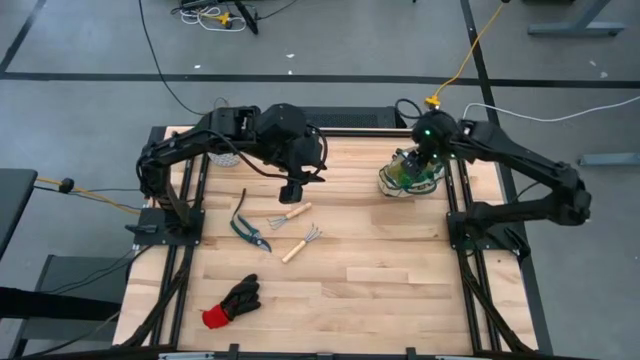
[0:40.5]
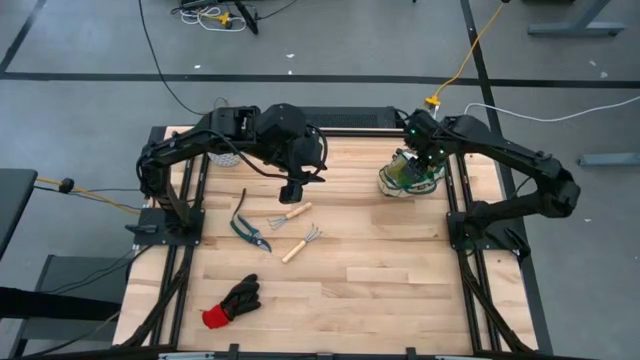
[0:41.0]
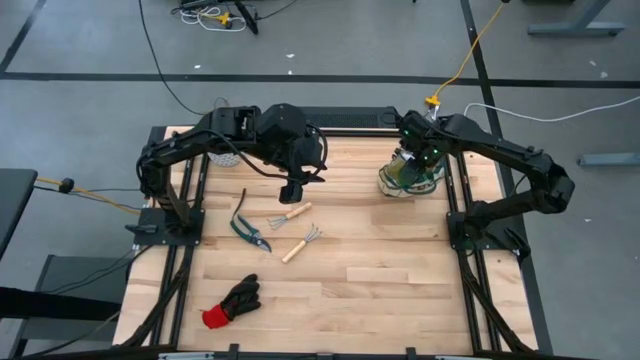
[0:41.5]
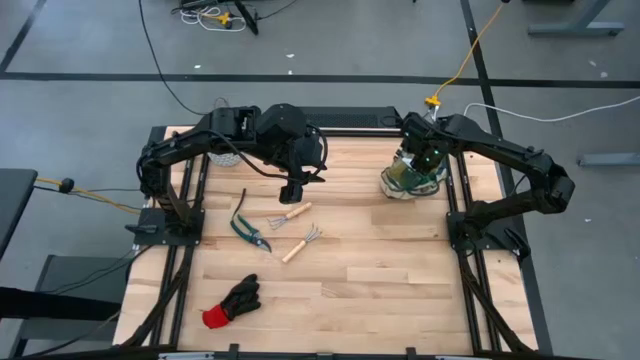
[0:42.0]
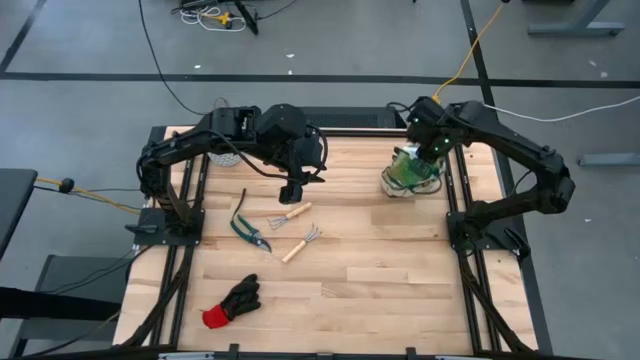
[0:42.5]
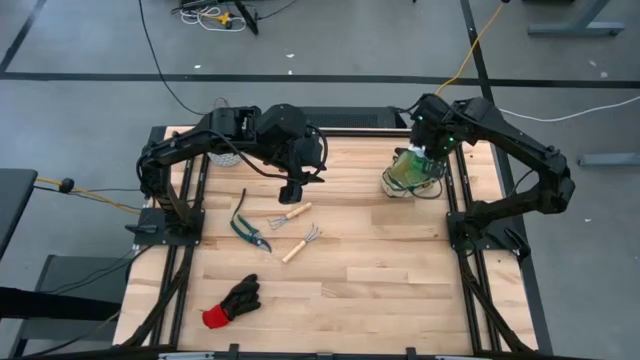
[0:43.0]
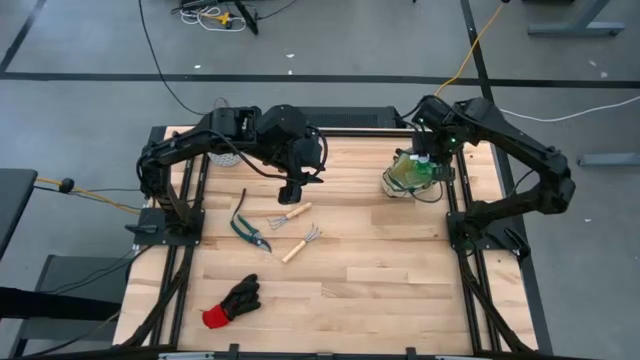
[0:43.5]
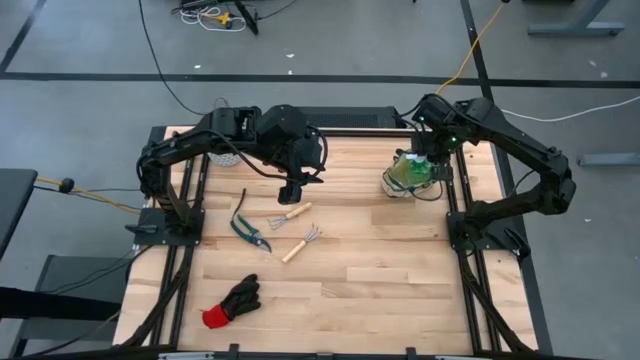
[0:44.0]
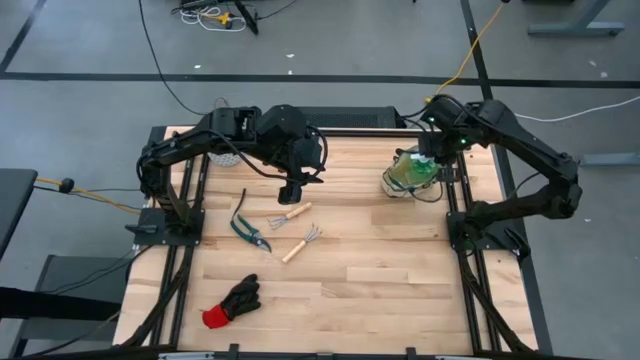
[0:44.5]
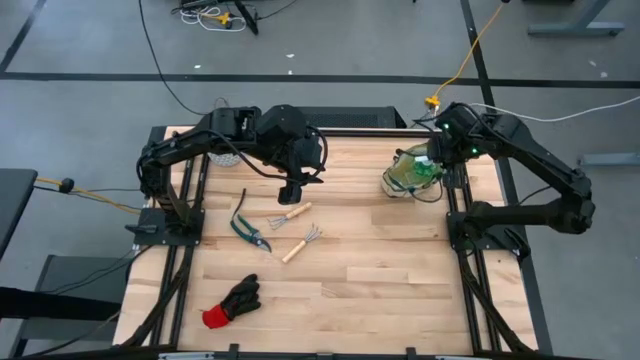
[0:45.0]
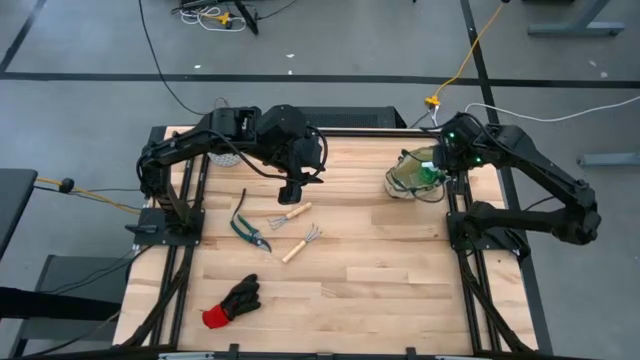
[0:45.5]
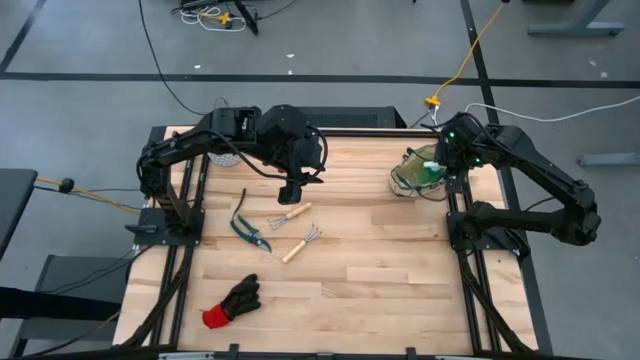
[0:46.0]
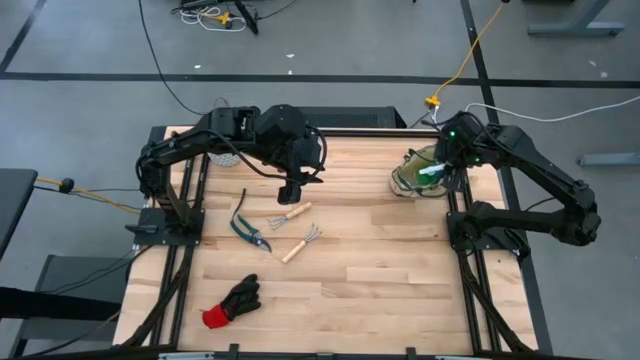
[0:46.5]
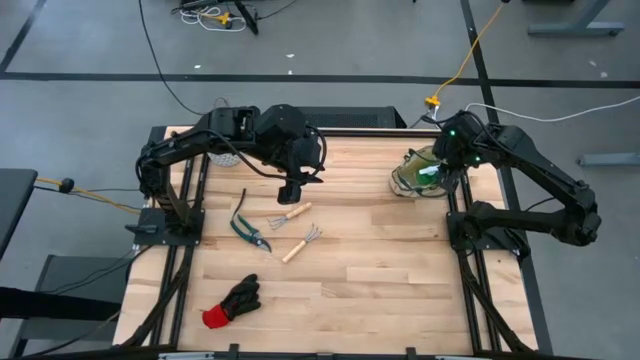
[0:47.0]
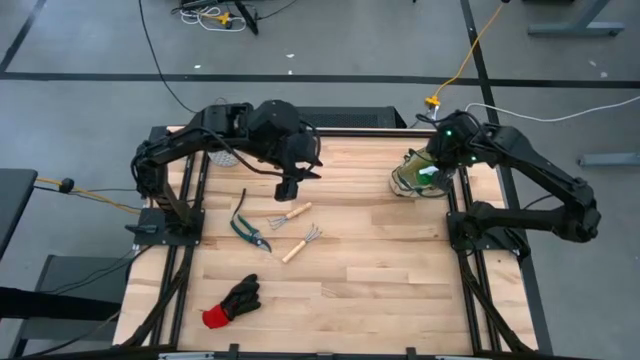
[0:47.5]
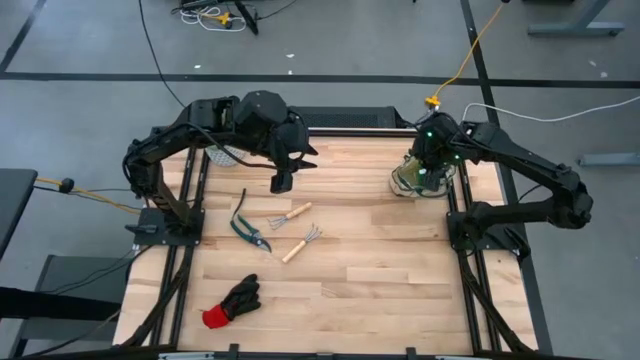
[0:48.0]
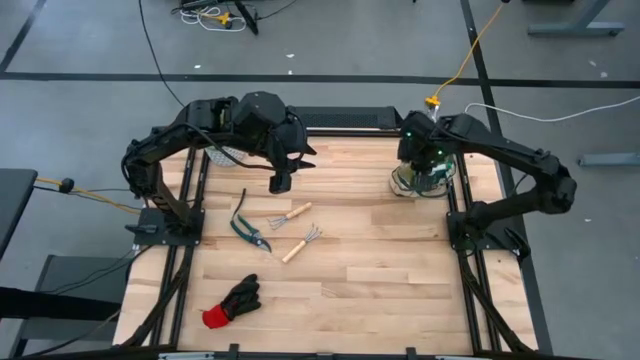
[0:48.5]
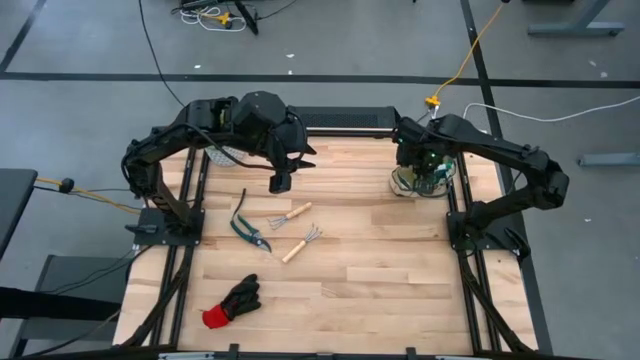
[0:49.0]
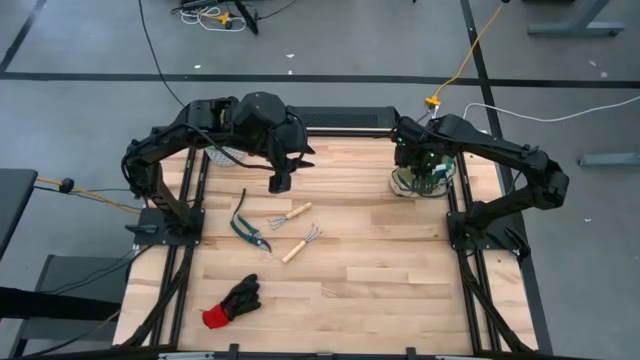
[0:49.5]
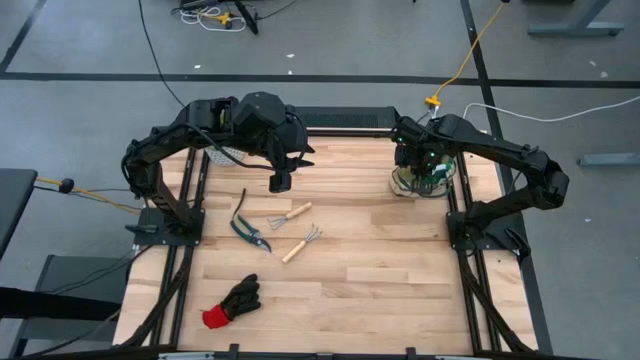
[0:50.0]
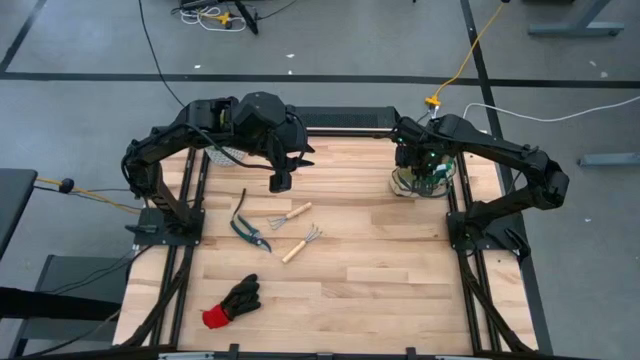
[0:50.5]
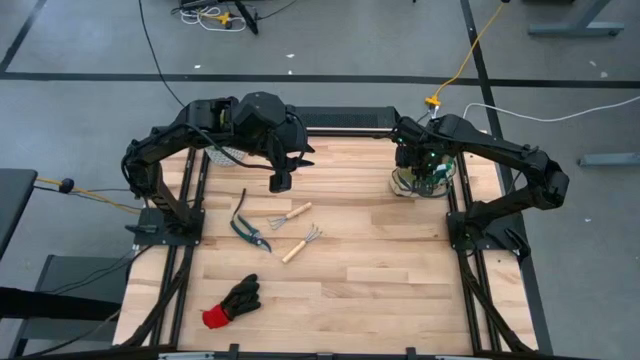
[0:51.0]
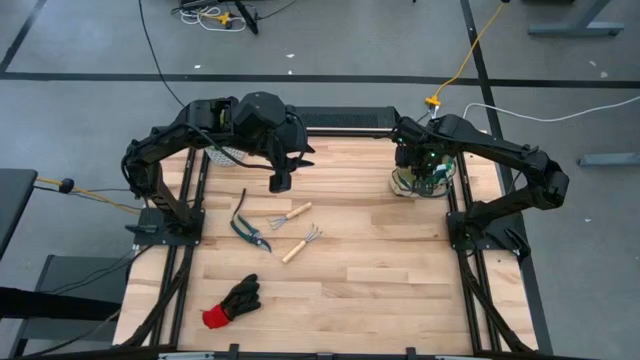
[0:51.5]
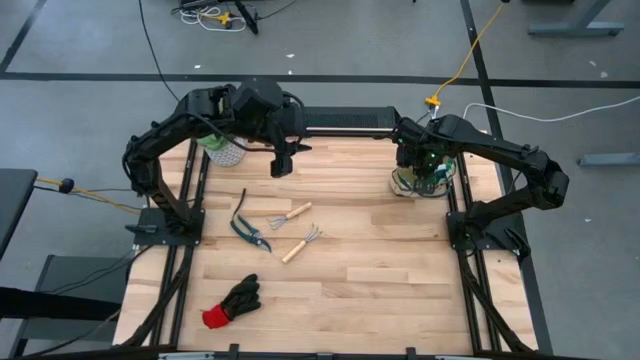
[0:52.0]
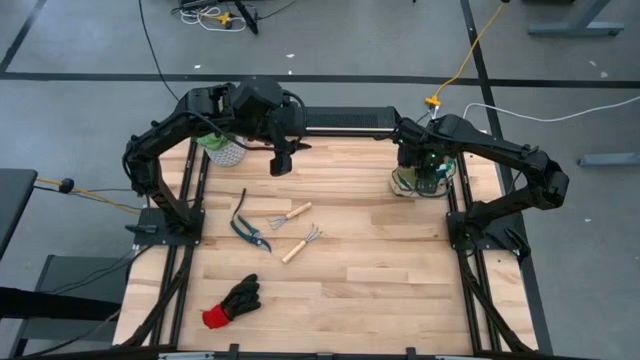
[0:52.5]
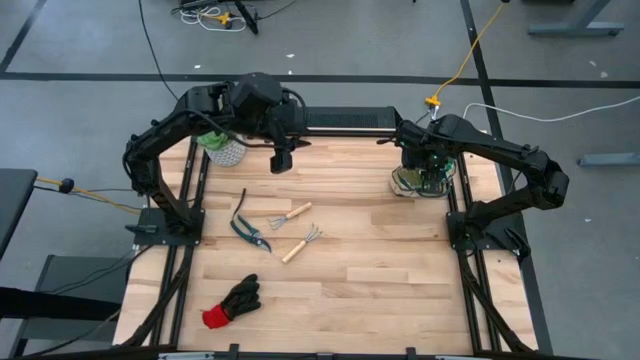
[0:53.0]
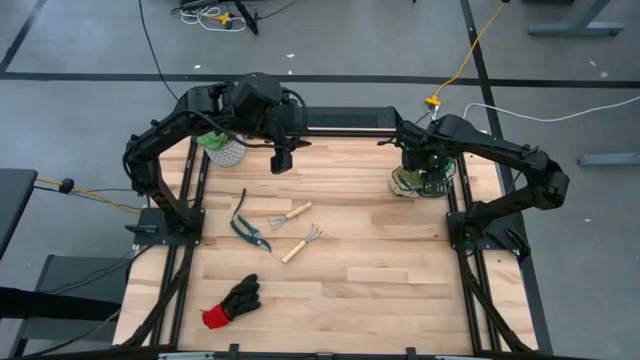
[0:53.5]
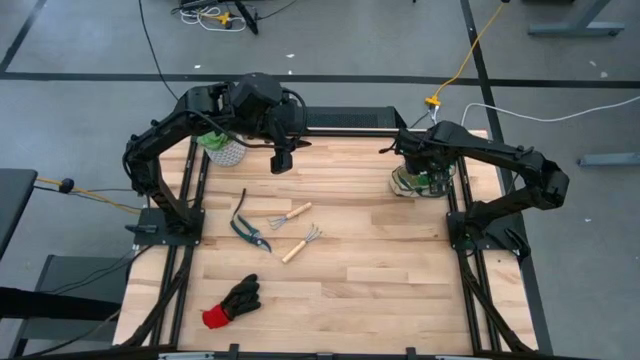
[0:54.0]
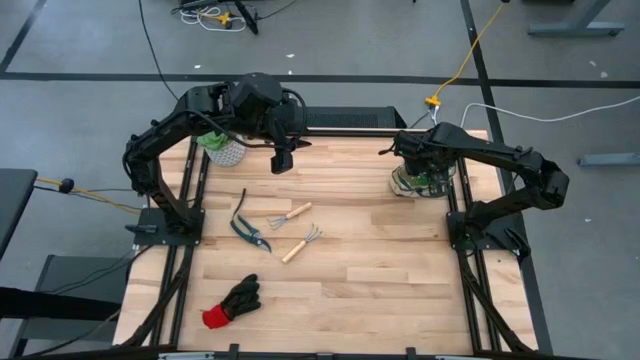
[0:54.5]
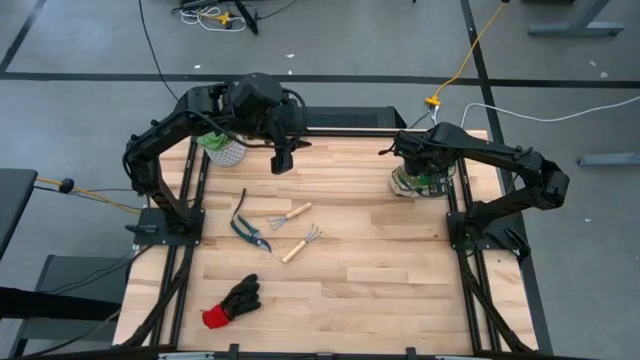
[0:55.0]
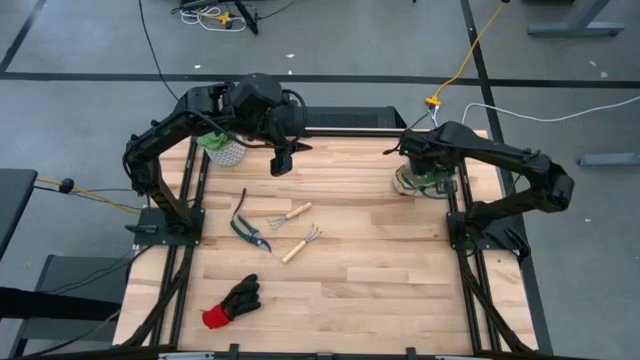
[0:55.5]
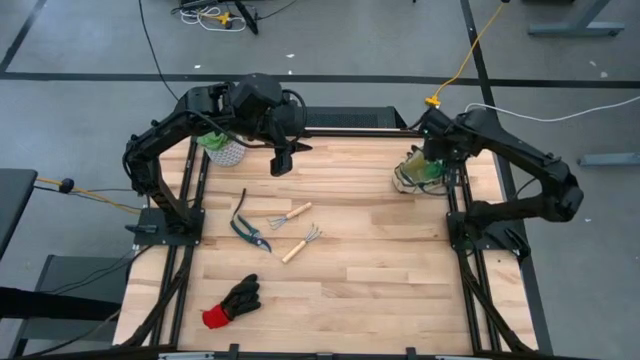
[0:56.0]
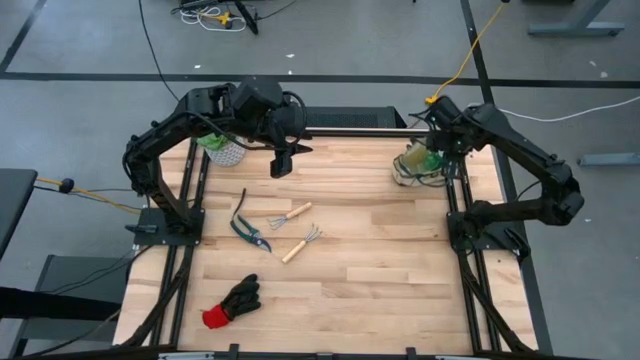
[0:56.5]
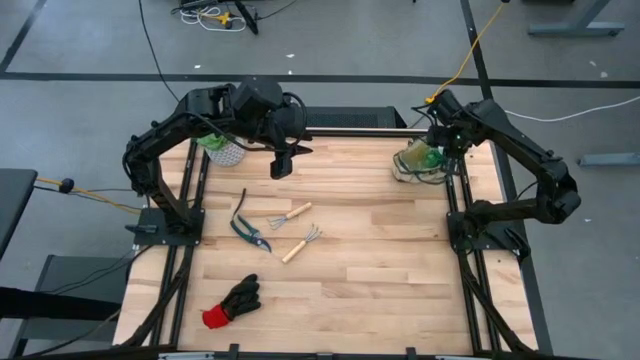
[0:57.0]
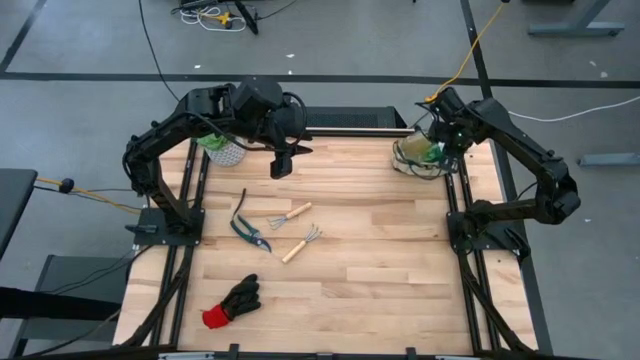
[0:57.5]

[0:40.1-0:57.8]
Task: Pick & Place Garden tools in Gardening bag
Put the green spray bottle into the brown gardening bag

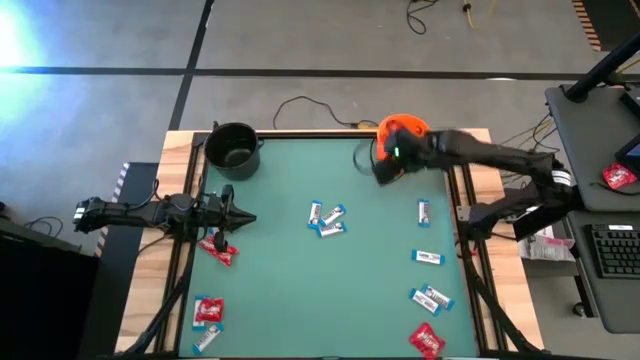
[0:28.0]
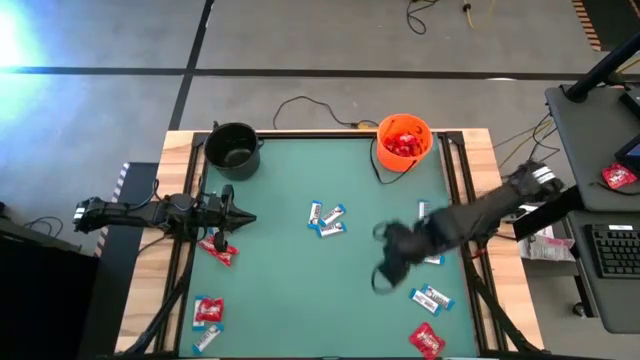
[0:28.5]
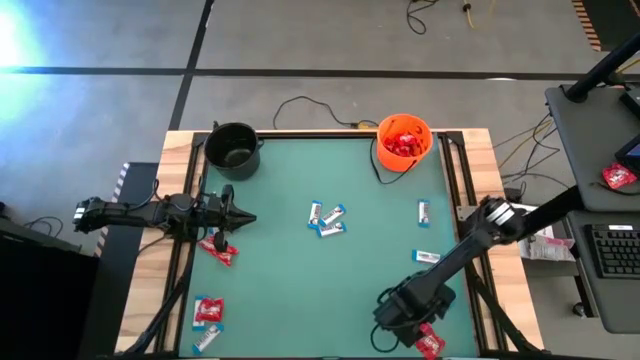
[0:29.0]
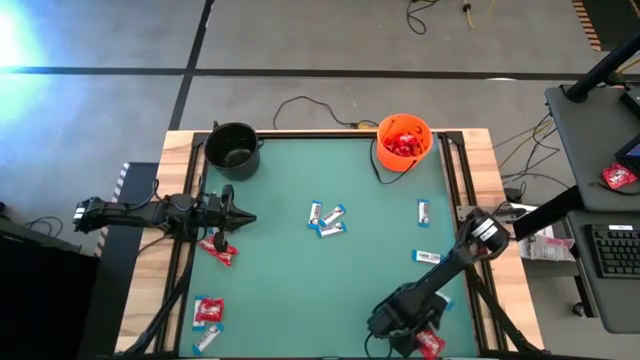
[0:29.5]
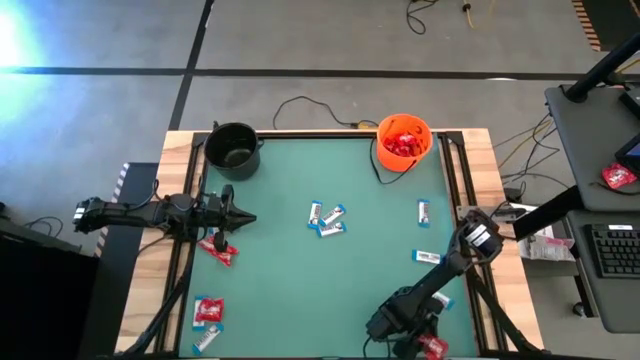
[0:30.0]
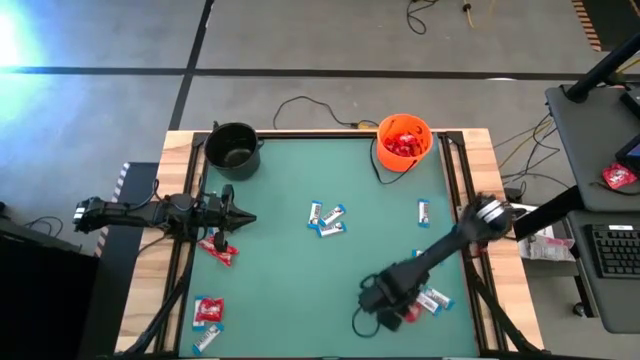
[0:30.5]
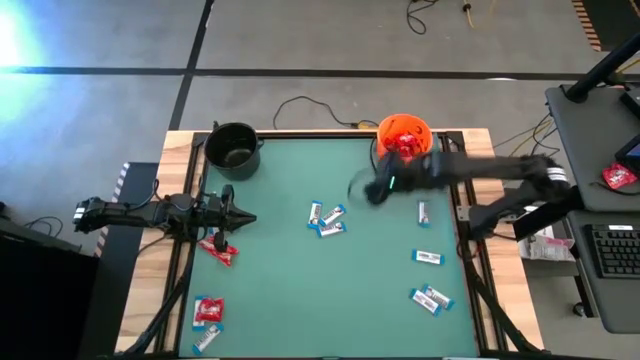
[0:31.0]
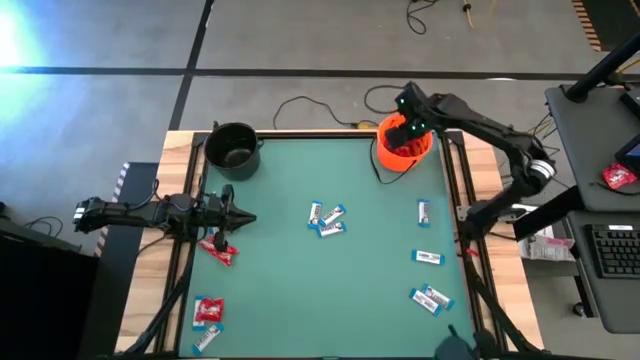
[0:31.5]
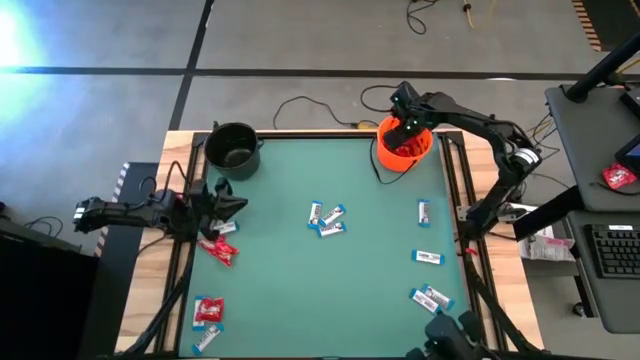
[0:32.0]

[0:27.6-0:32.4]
Task: Sort candy by brand, put in halloween buckets
Put the red candy into the orange bucket
